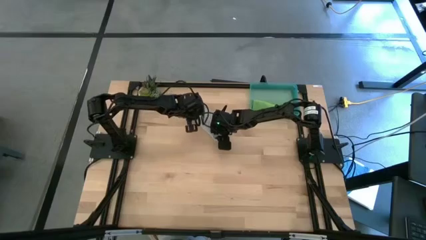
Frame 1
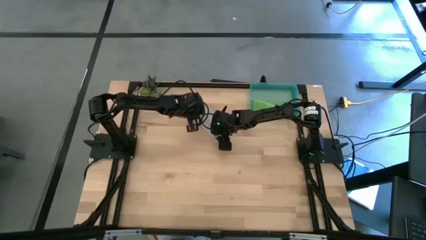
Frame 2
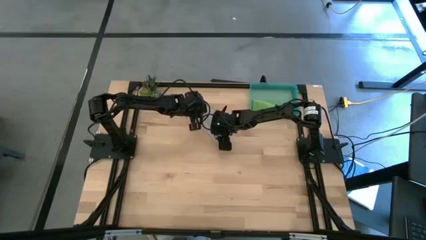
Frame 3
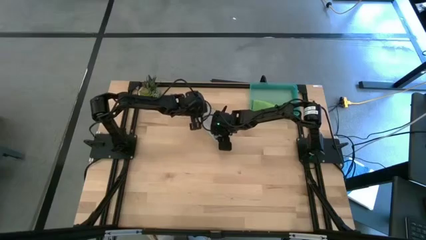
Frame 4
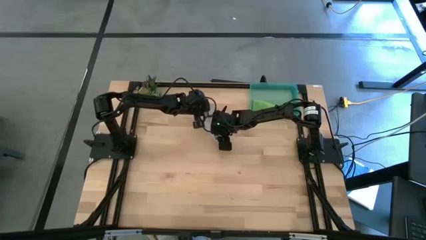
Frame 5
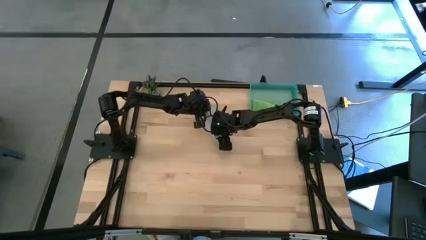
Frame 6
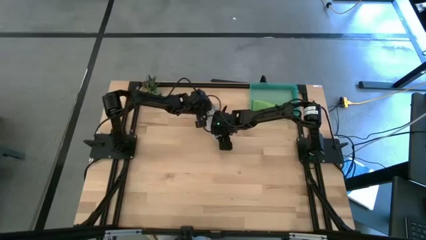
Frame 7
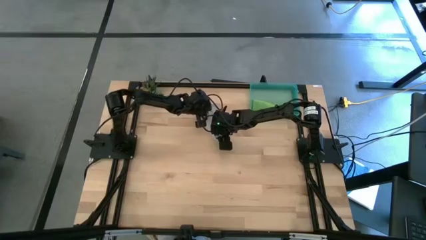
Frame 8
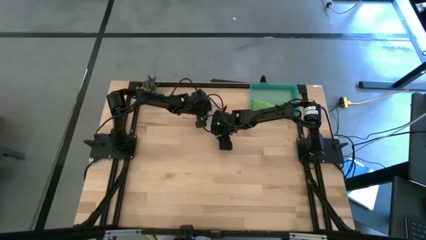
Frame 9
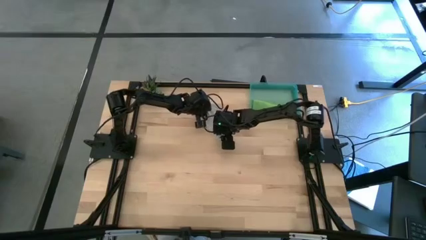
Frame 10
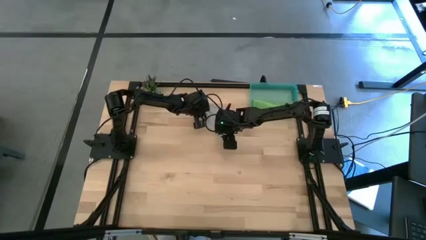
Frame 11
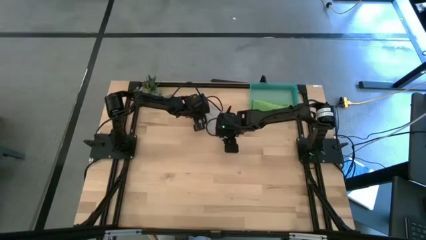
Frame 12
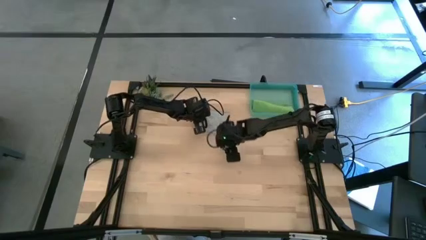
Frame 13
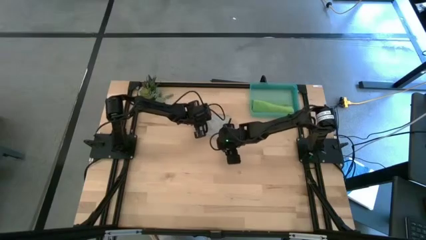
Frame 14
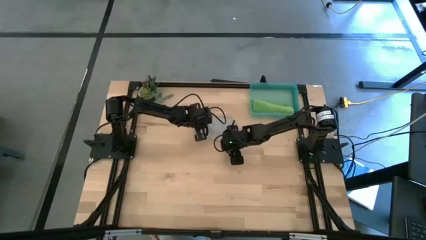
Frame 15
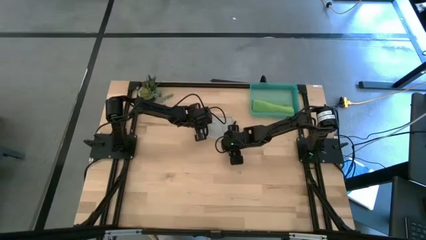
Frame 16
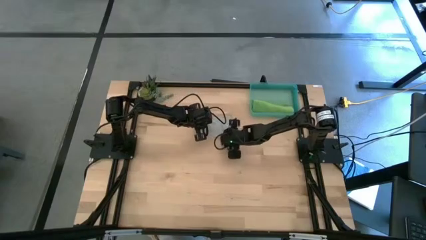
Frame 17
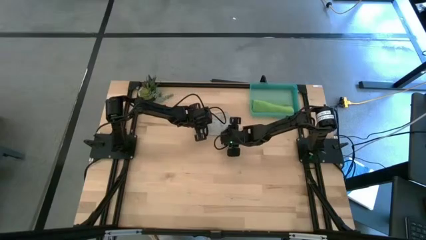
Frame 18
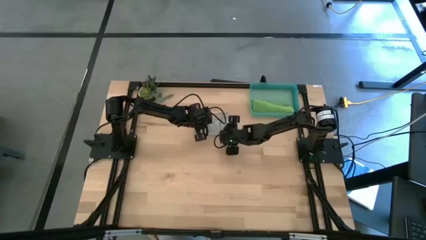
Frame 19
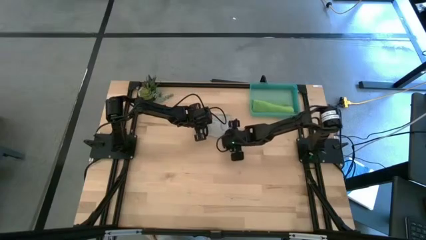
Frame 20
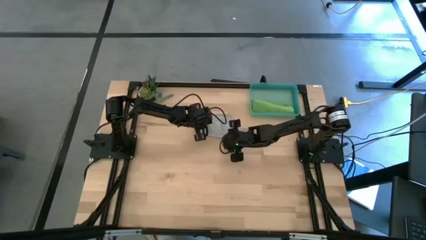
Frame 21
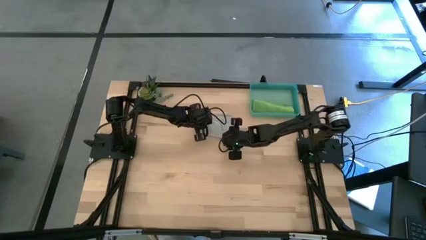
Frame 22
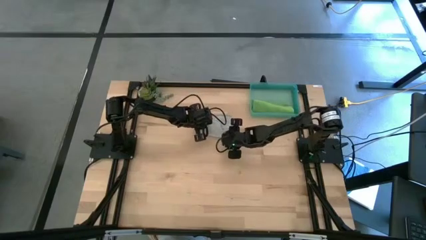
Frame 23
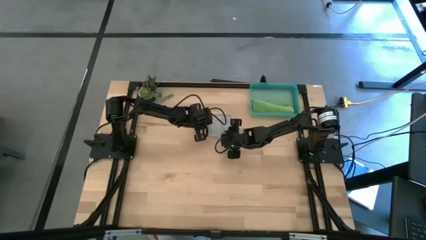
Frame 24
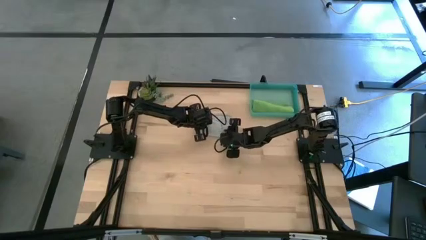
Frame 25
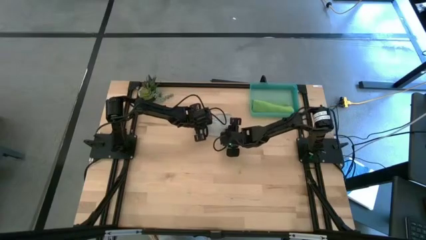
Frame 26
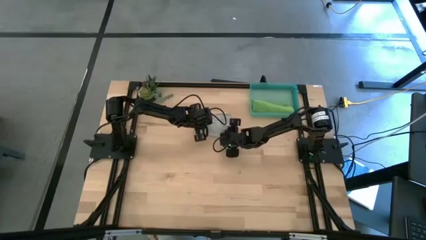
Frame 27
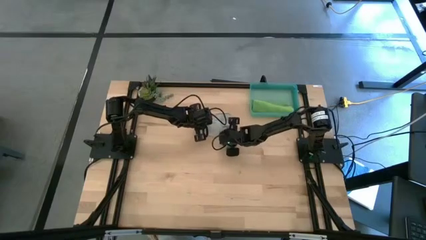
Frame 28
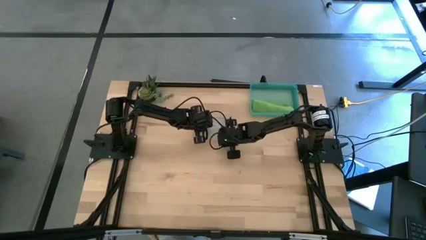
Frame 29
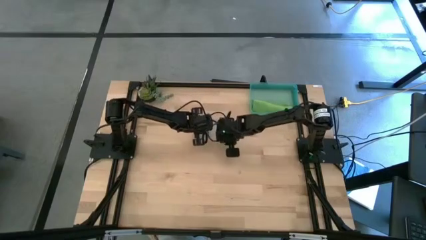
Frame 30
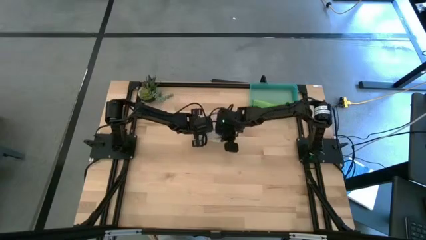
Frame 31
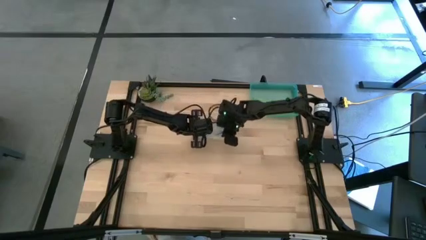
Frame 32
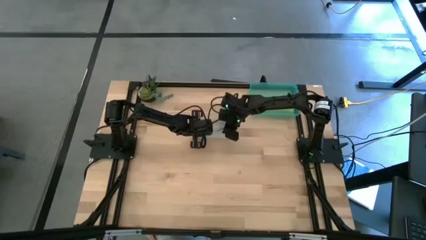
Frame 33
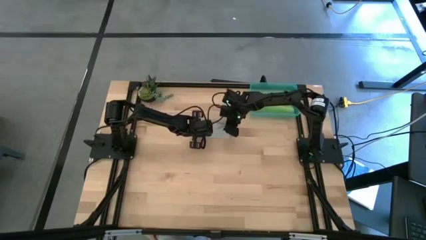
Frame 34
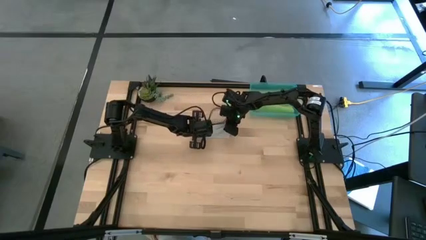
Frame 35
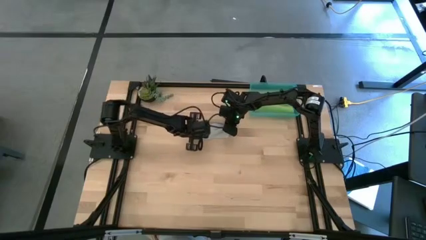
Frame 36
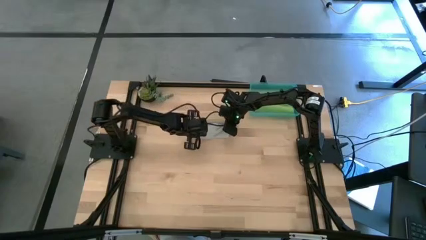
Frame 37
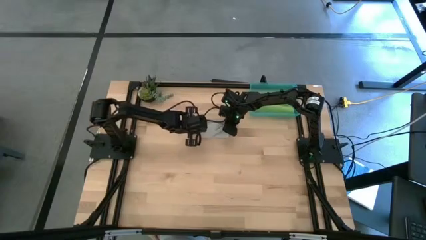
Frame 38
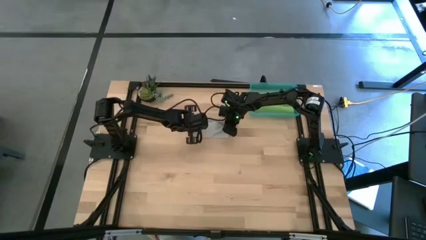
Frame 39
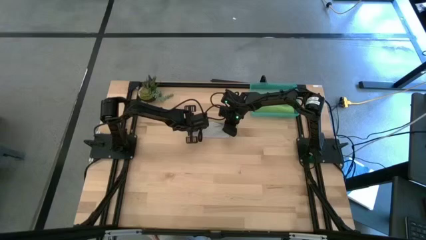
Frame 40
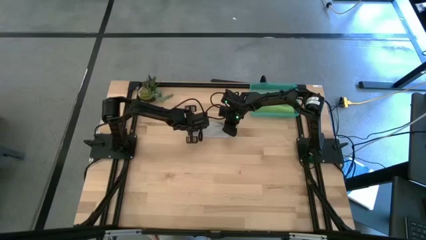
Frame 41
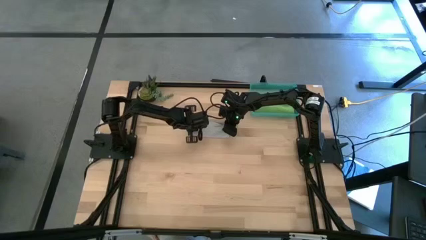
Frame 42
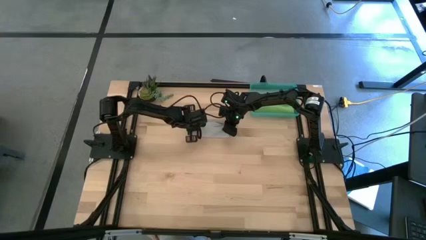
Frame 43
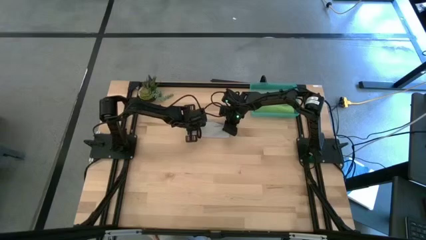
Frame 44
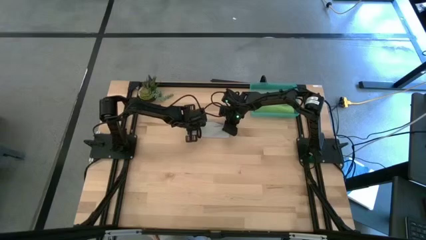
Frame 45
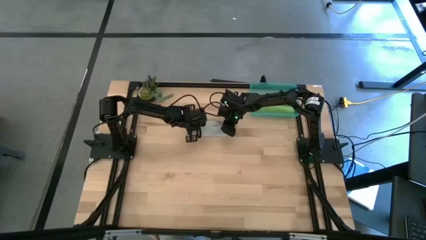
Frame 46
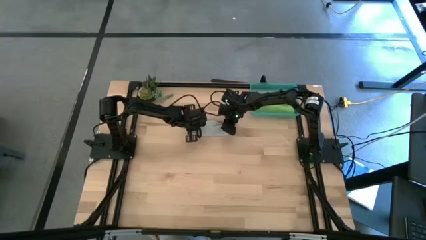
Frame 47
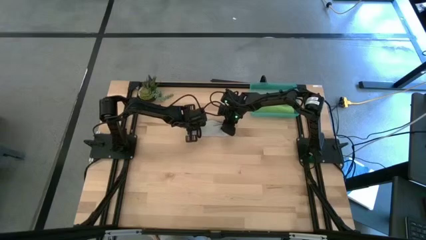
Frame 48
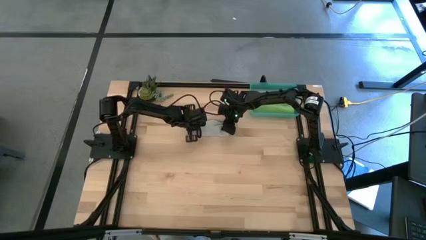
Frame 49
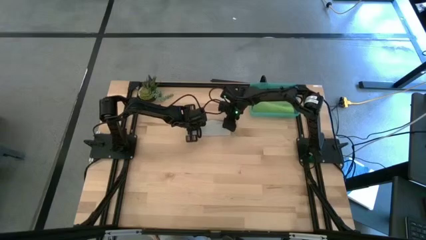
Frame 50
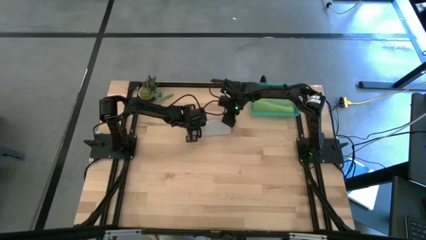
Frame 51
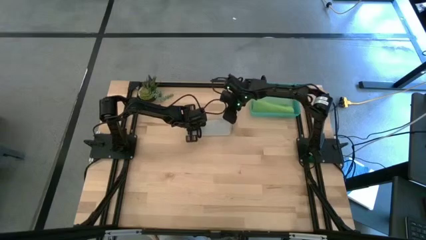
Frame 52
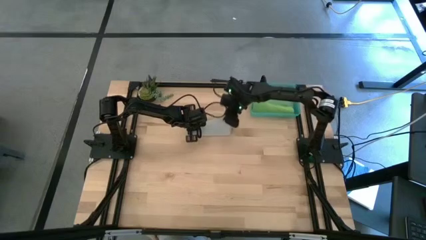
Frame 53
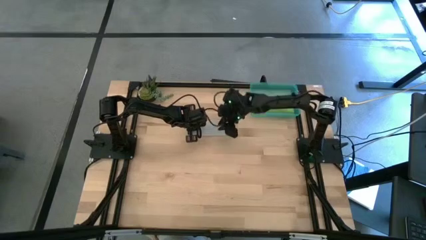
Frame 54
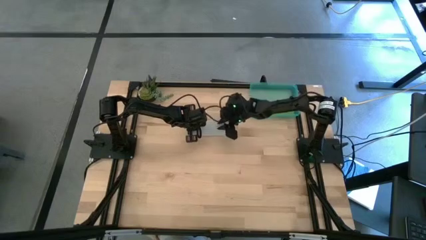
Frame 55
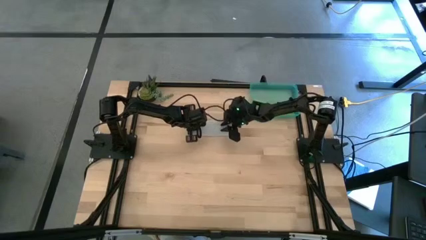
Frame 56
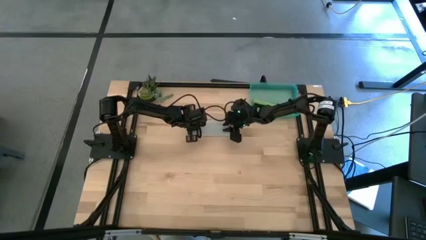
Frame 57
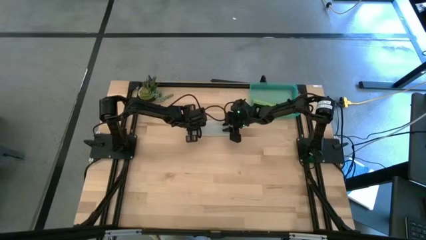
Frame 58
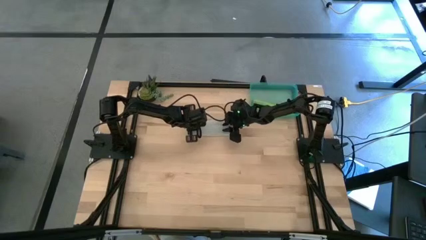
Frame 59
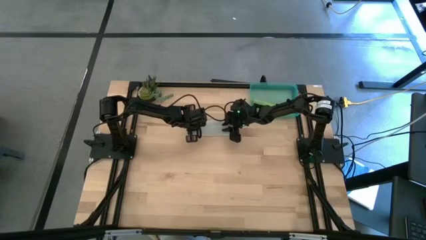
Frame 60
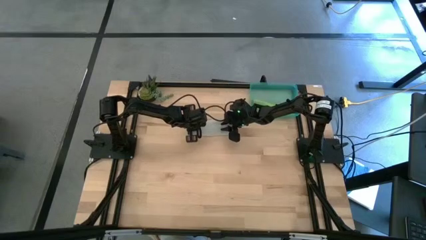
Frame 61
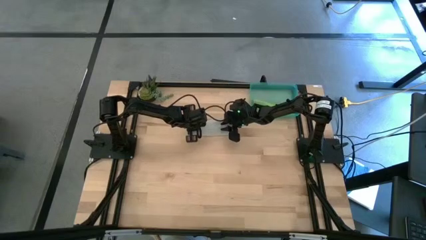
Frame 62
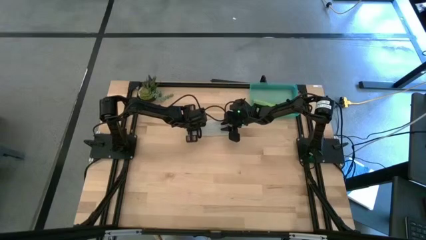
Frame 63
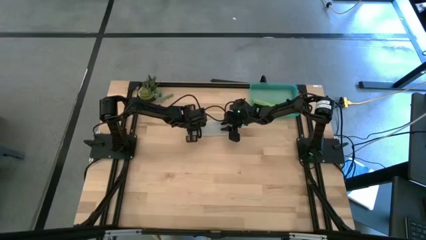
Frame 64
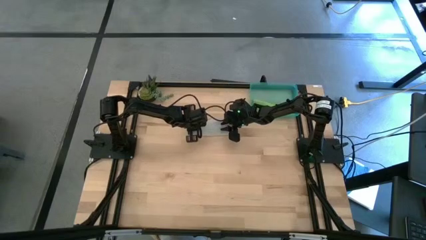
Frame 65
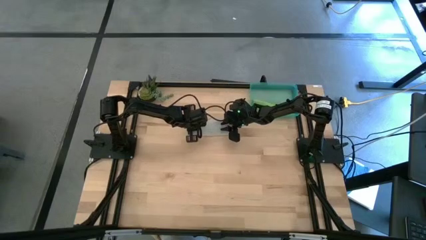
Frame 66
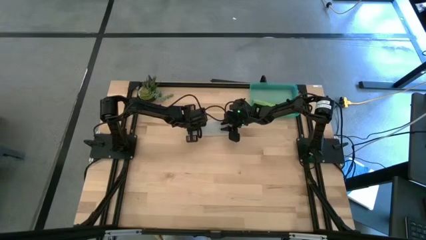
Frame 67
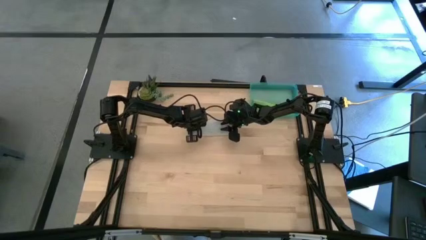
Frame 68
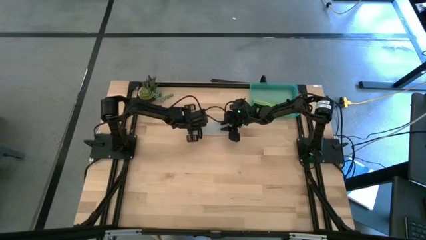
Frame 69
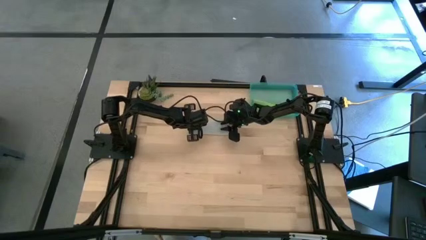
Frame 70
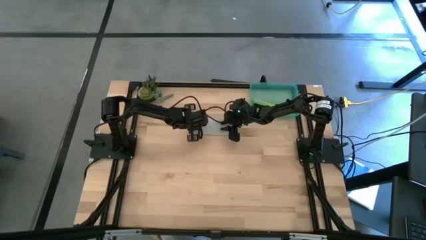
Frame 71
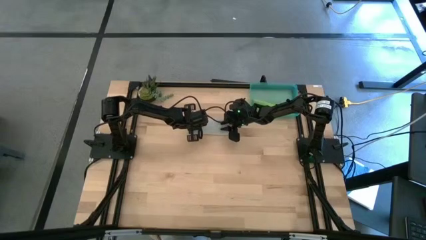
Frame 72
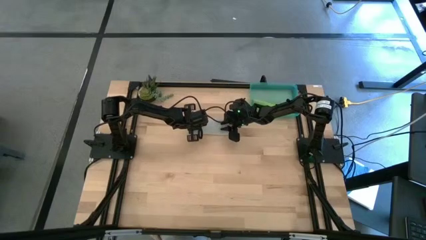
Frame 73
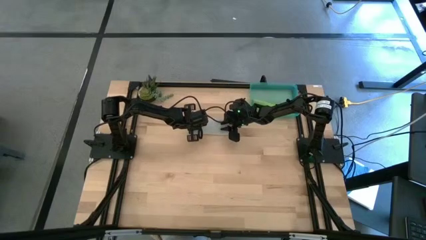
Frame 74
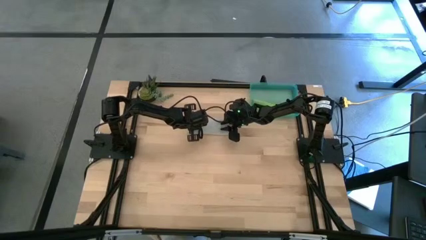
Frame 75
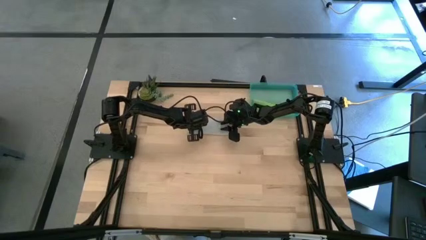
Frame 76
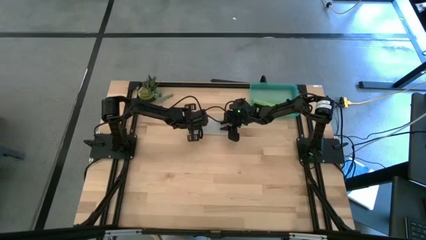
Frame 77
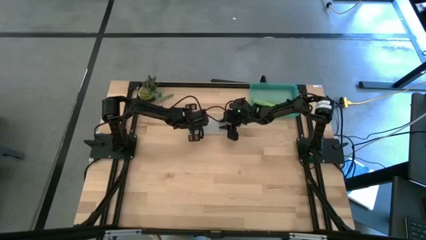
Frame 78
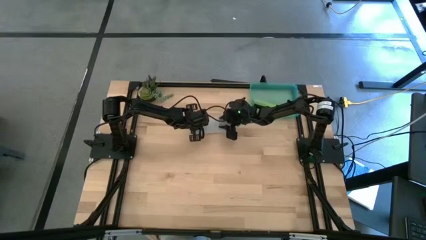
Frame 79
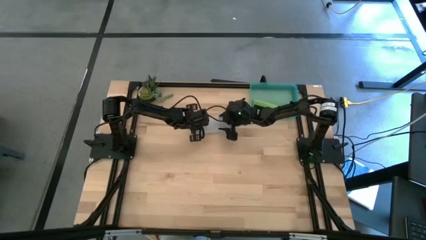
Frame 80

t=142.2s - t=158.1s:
Task: Roll microfiber towels into tight, uniform cylinder then place into a basket
Roll the gray microfiber cloth
